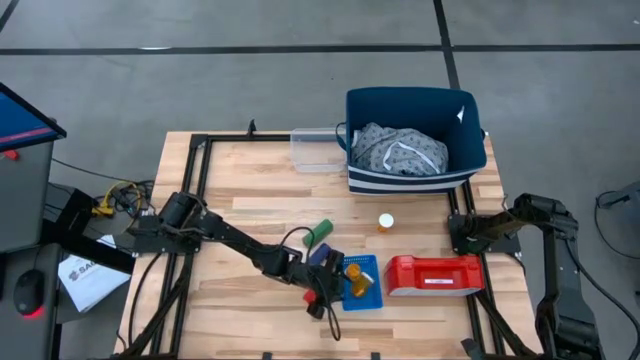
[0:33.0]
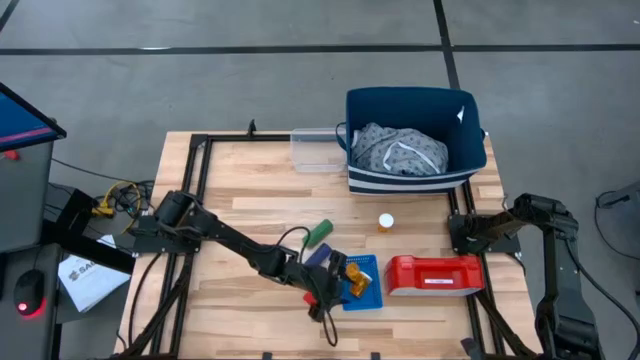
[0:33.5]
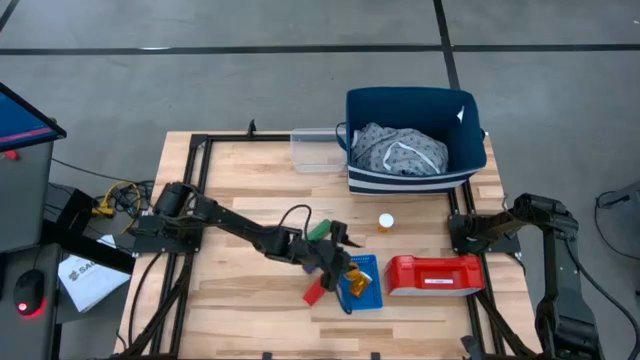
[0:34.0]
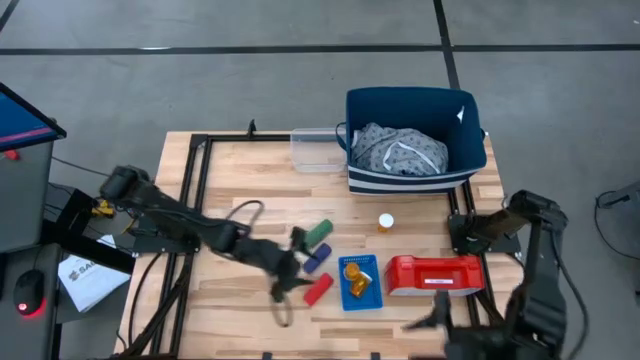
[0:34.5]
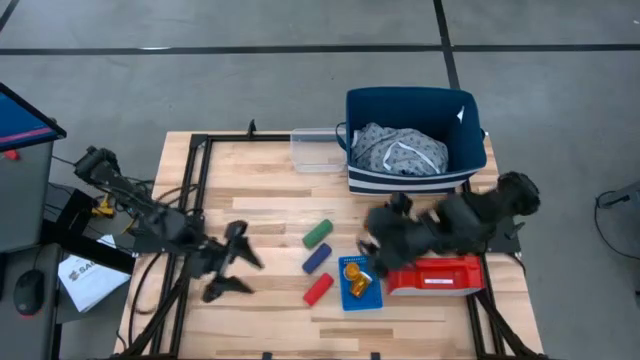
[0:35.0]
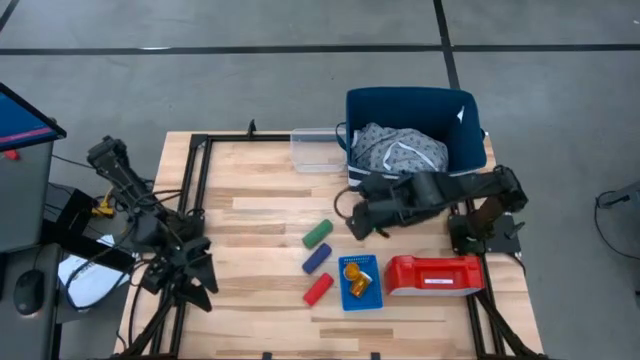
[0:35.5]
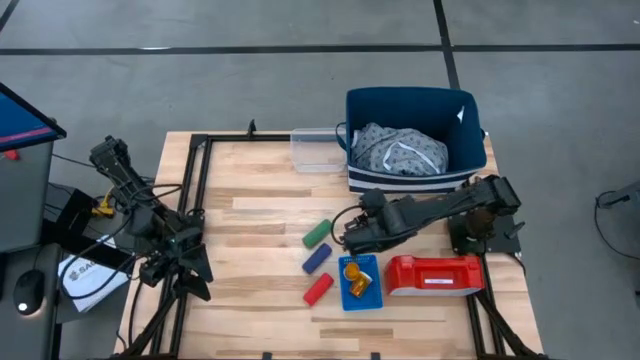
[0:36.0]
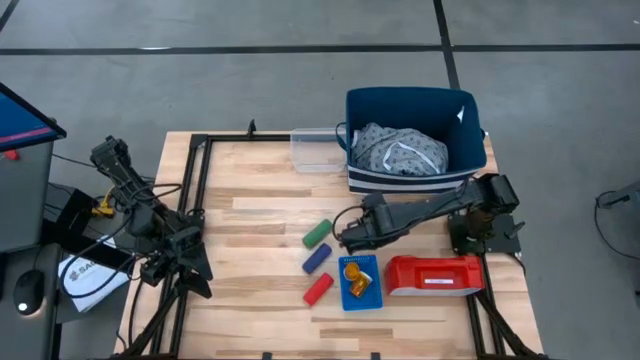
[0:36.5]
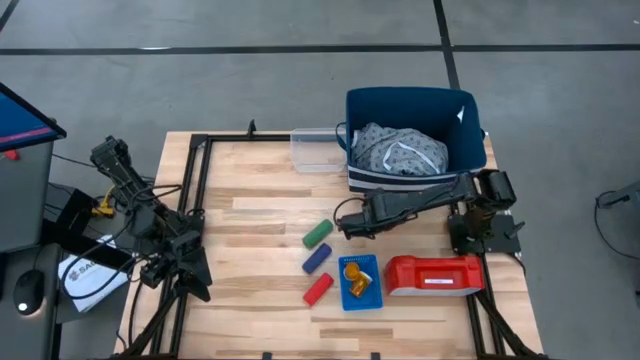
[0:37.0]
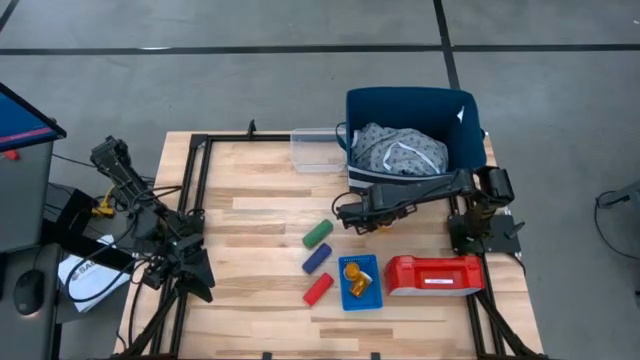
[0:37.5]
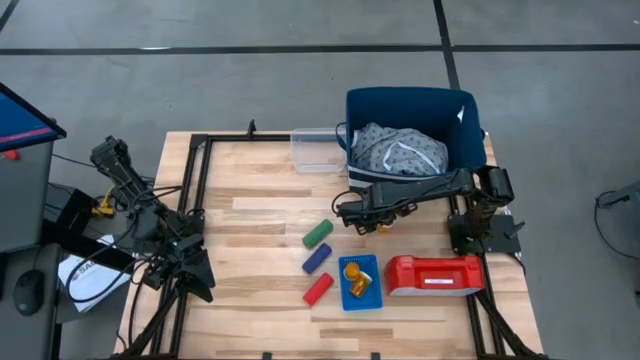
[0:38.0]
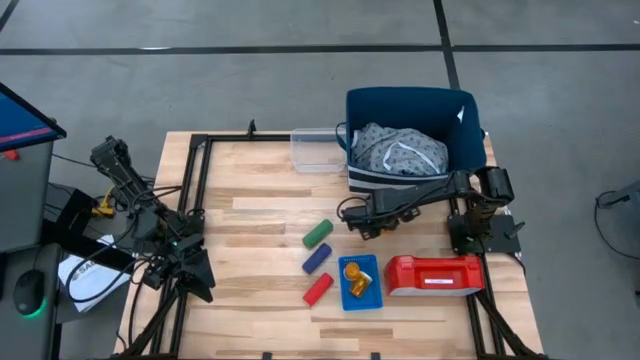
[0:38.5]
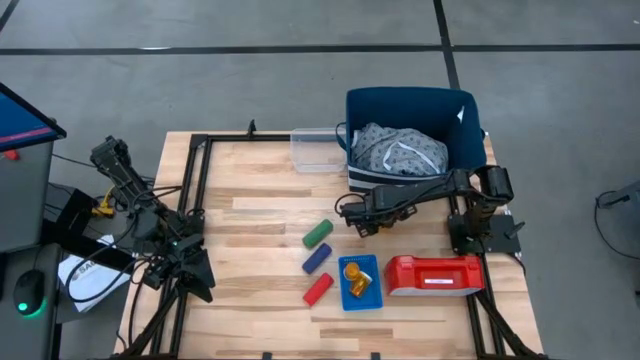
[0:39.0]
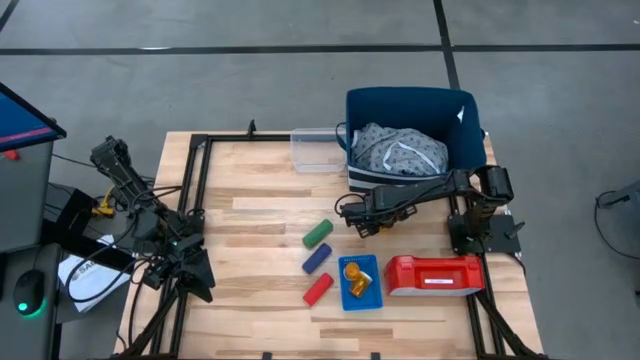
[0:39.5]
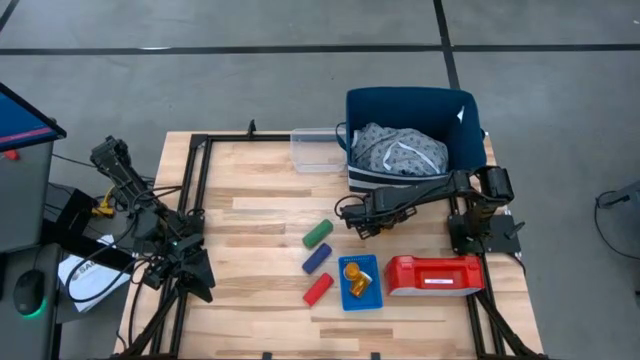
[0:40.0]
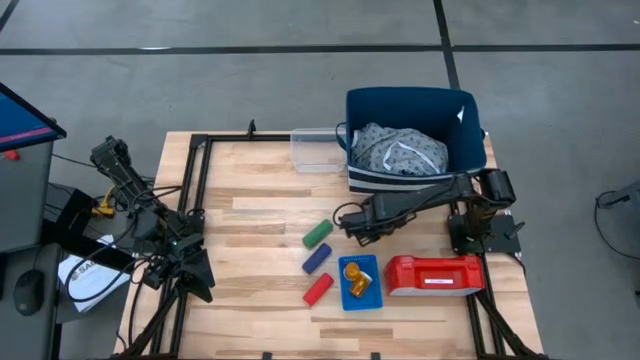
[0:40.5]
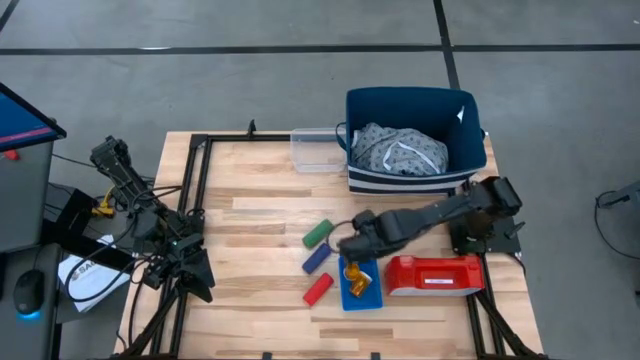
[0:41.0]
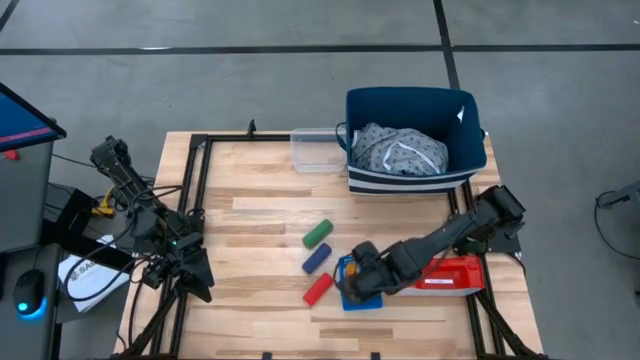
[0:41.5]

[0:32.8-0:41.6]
Task: Pick & Place Medicine items
Put the orange pill bottle into the blue bin

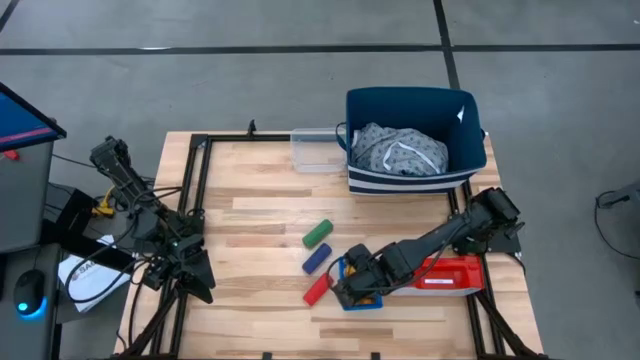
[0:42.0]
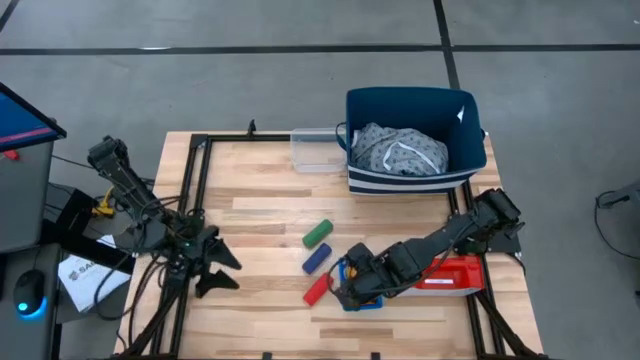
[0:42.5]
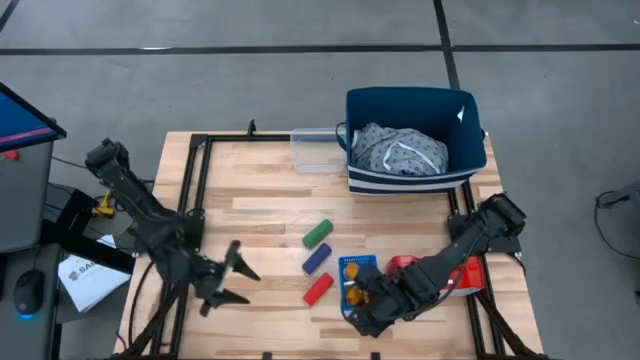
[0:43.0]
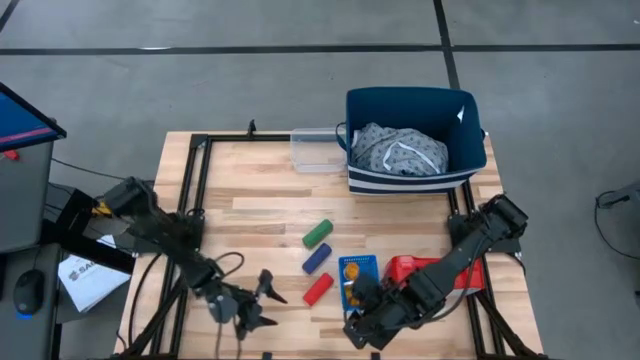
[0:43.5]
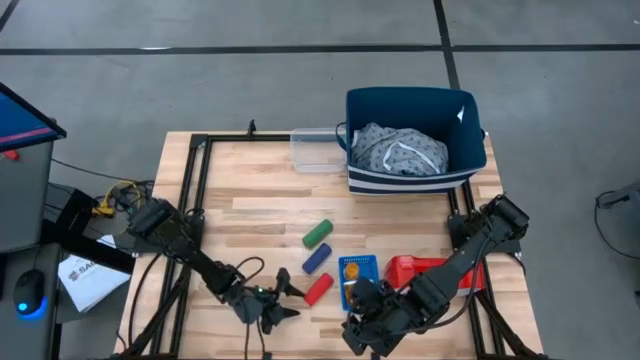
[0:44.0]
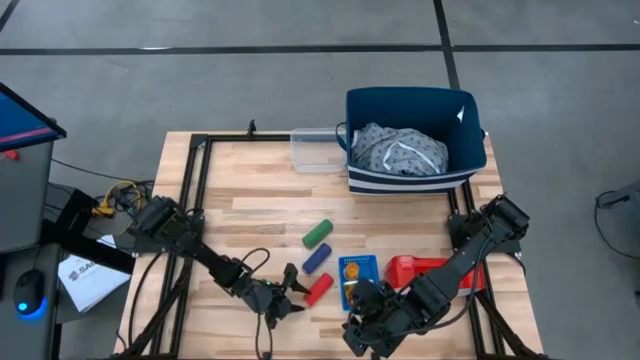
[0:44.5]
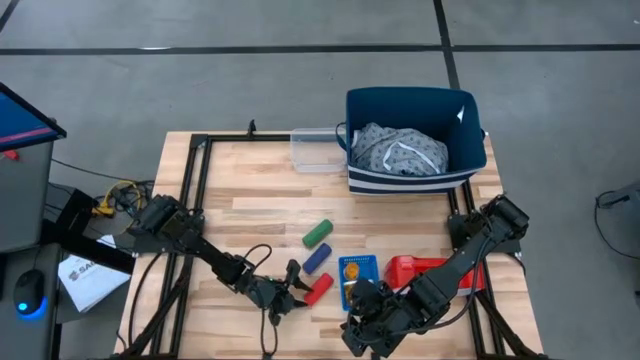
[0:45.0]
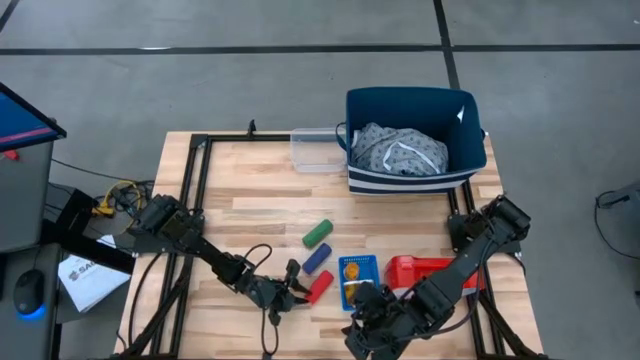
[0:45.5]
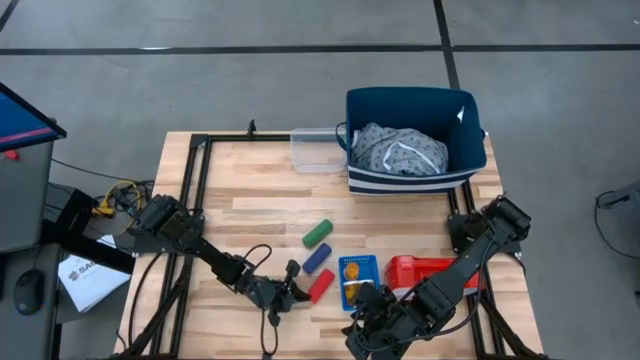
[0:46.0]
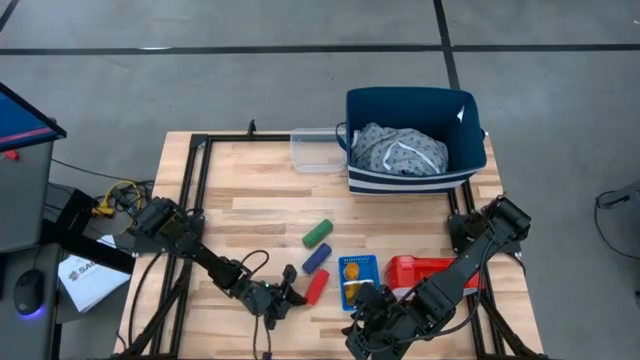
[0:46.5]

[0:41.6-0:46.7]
Put the red bandage into the transparent bin

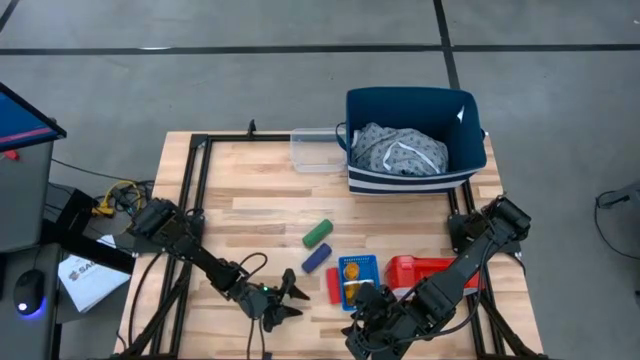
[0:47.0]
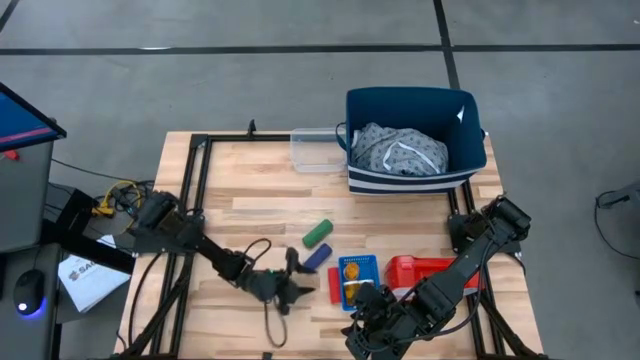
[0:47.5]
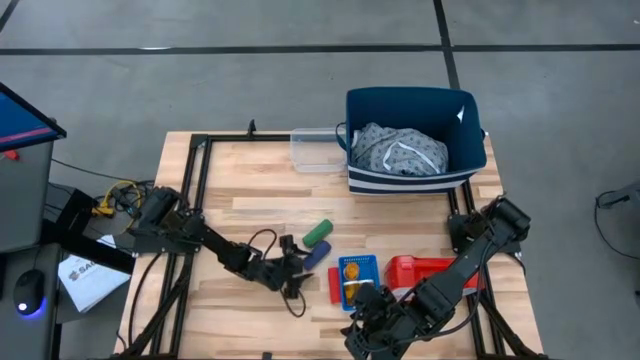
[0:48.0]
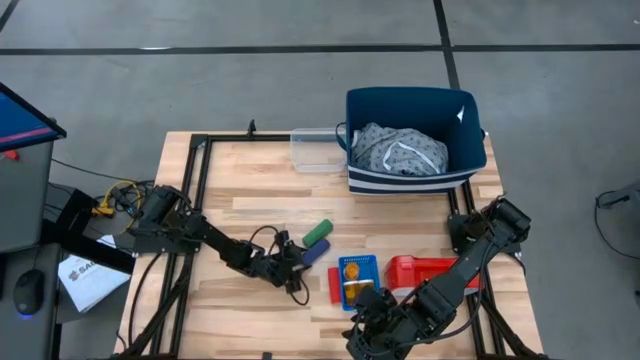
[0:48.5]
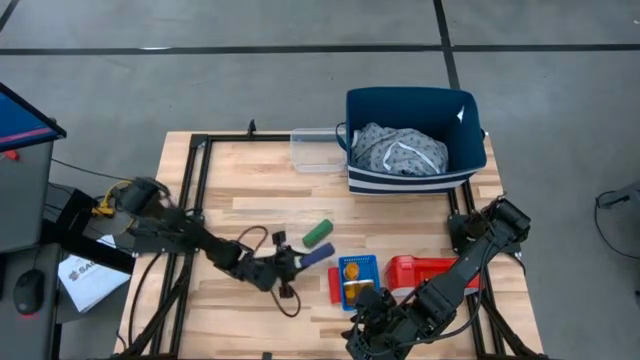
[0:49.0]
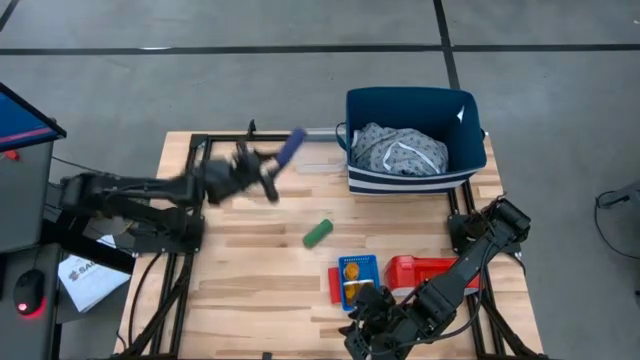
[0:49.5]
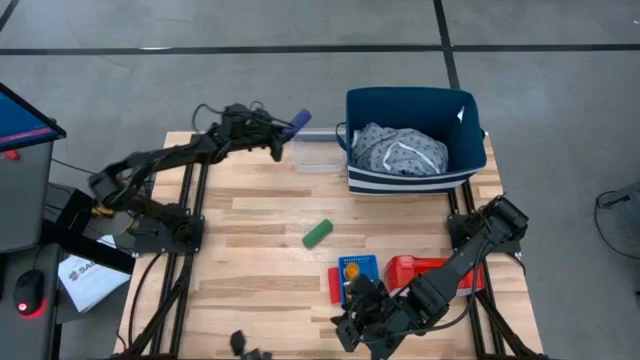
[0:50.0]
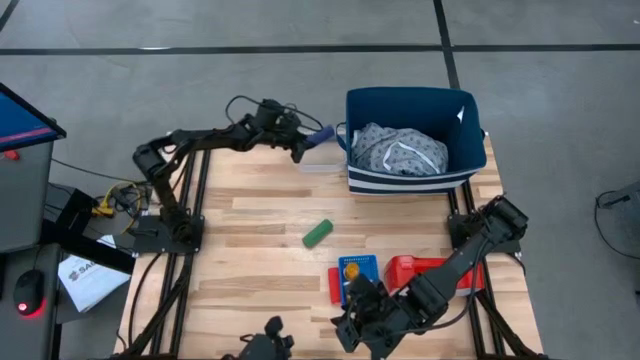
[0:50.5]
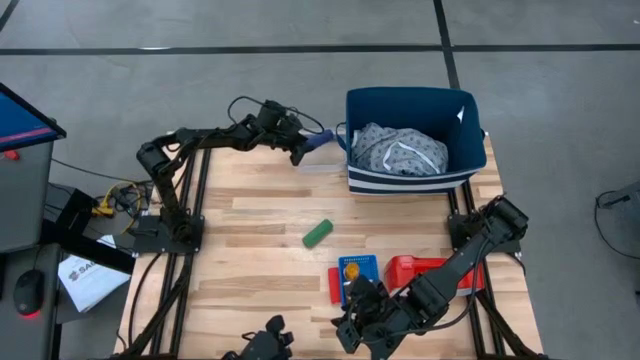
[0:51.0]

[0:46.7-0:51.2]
Put the violet bandage into the transparent bin

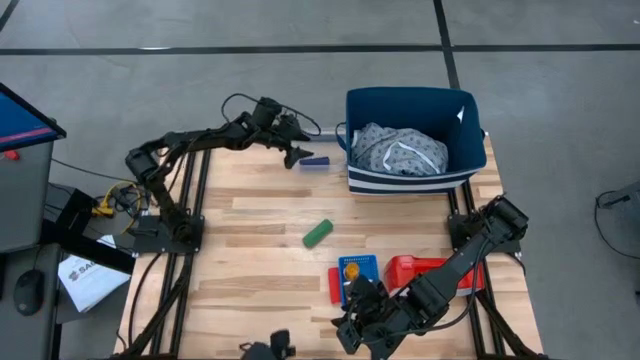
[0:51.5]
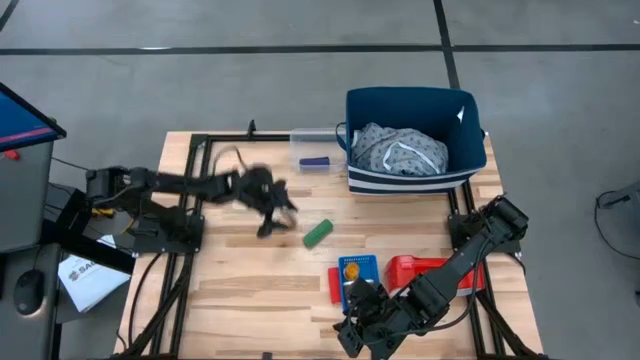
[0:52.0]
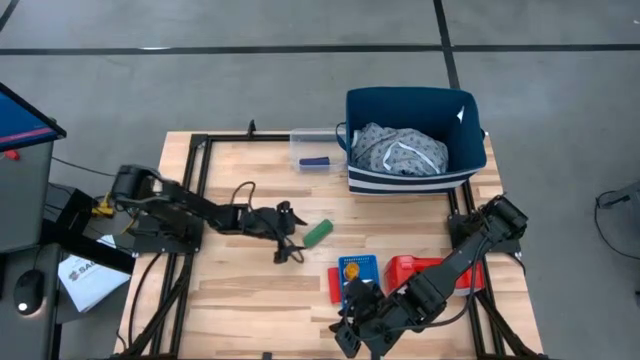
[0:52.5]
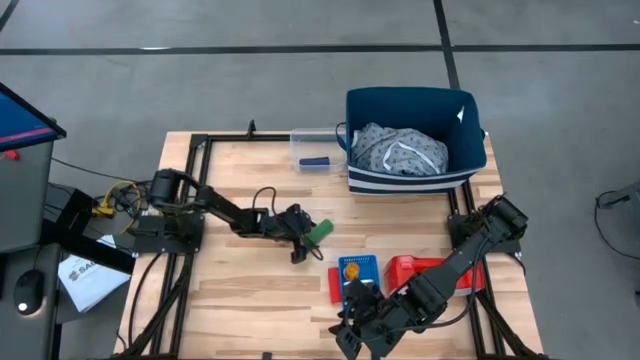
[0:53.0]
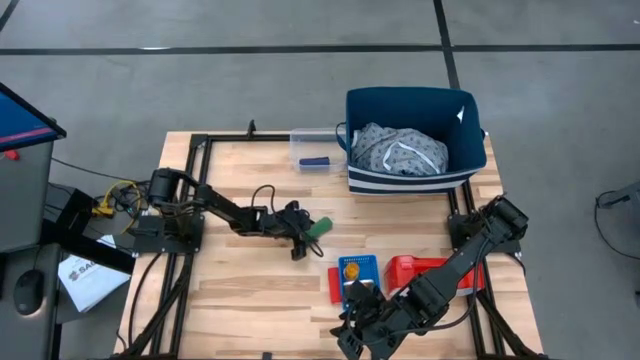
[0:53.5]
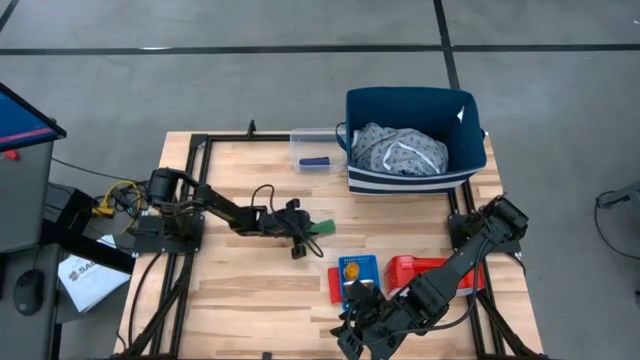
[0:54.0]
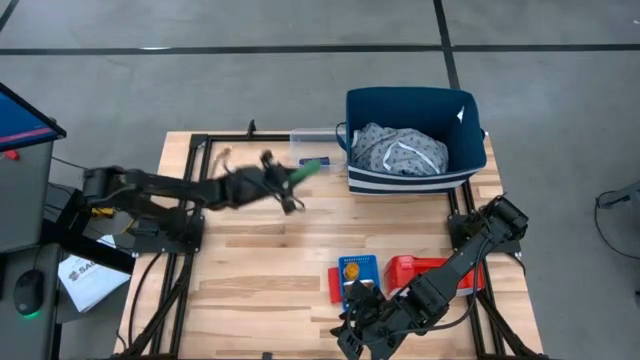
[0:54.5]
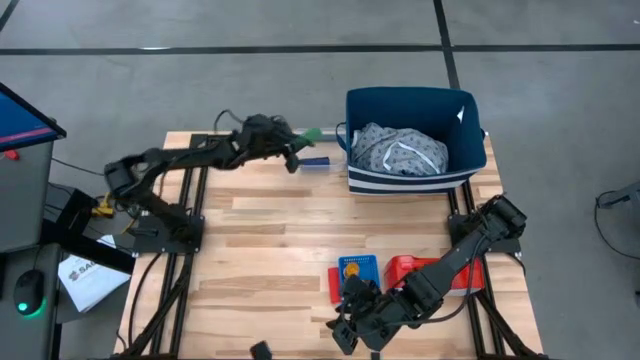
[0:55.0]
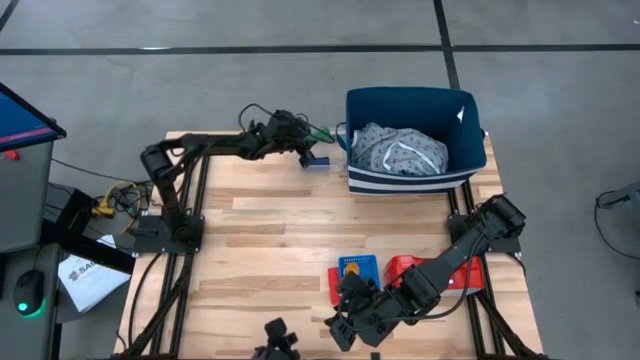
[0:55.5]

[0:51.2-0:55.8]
Put the green bandage into the transparent bin
